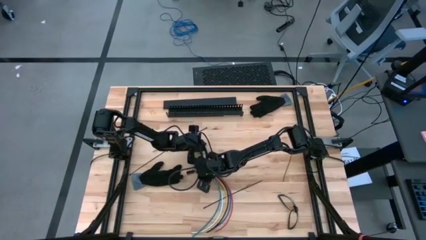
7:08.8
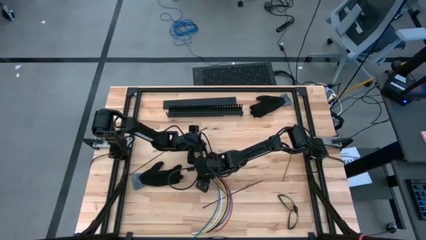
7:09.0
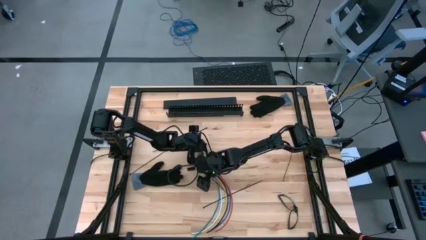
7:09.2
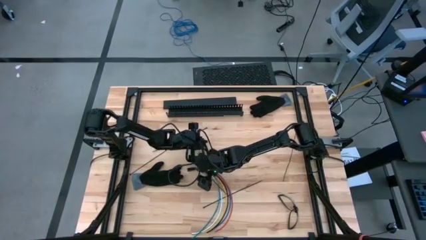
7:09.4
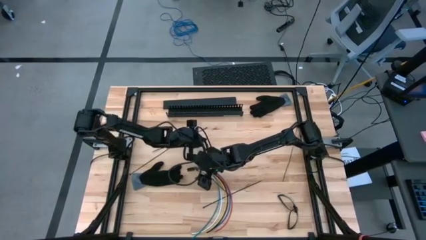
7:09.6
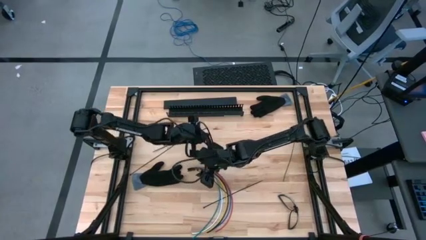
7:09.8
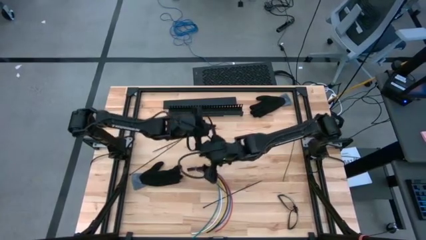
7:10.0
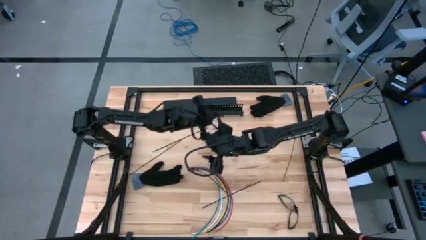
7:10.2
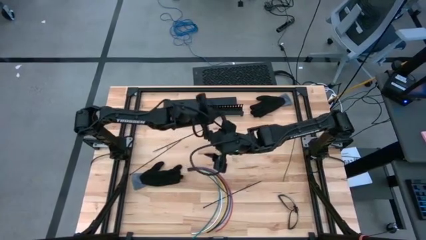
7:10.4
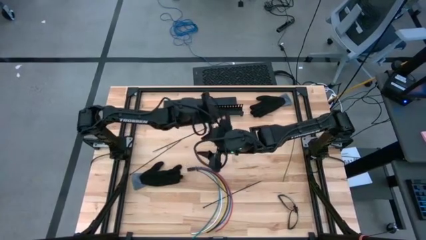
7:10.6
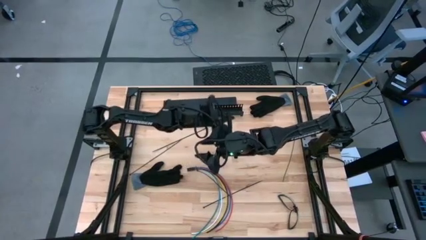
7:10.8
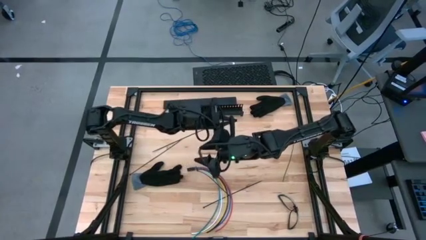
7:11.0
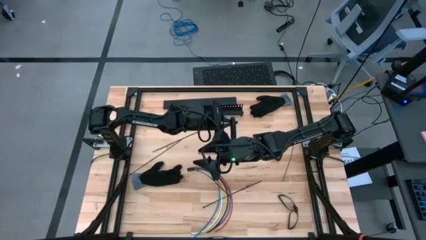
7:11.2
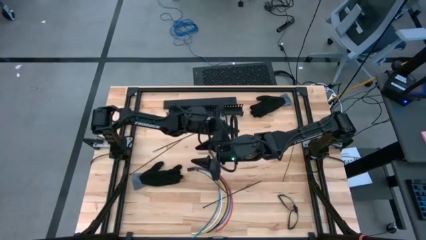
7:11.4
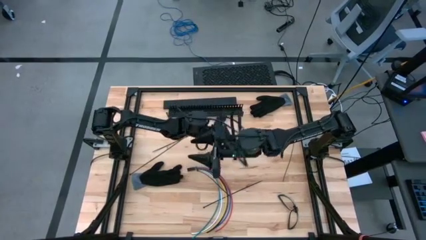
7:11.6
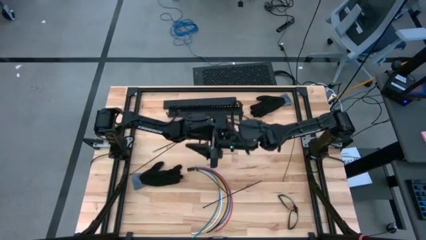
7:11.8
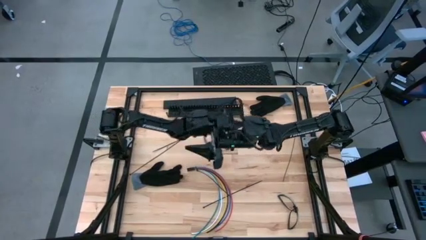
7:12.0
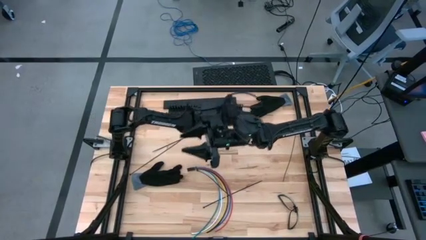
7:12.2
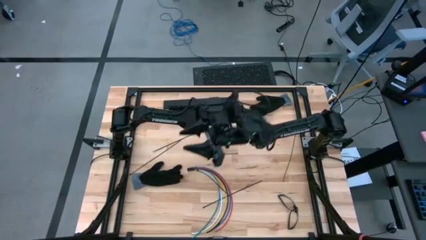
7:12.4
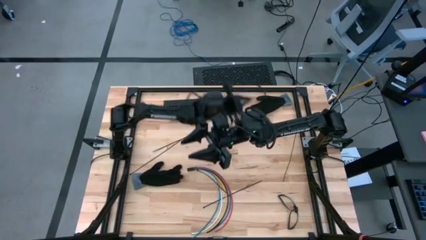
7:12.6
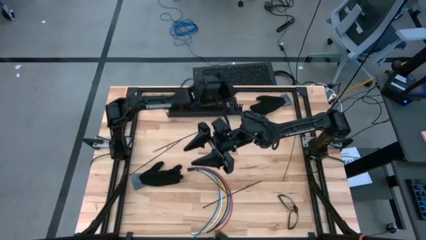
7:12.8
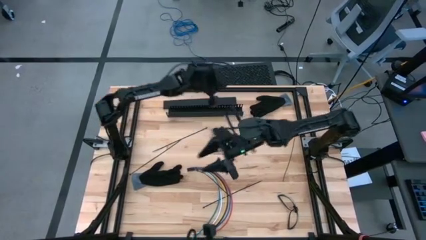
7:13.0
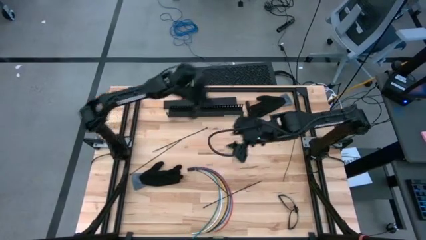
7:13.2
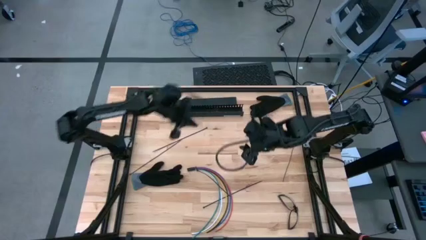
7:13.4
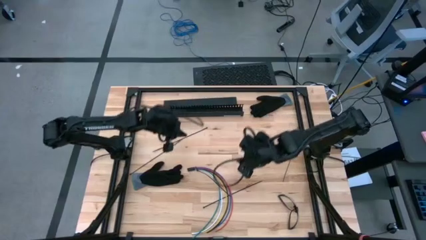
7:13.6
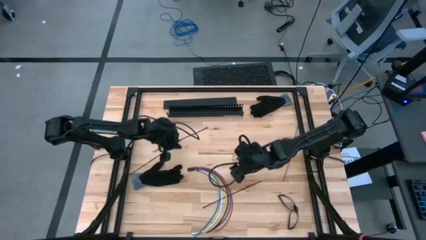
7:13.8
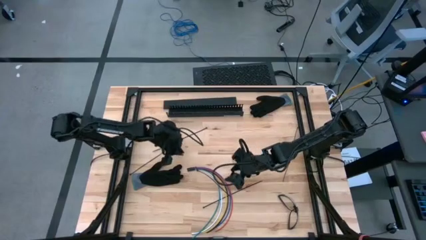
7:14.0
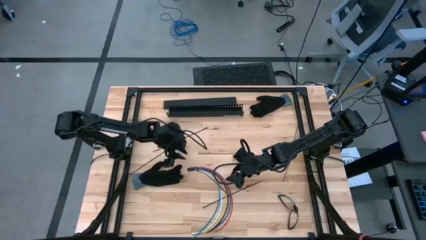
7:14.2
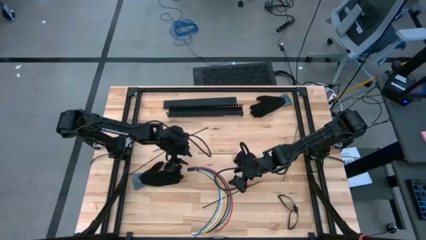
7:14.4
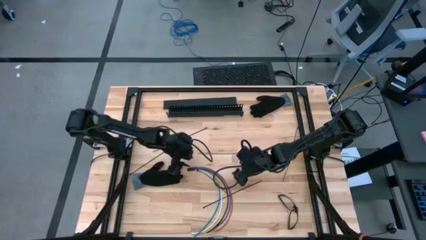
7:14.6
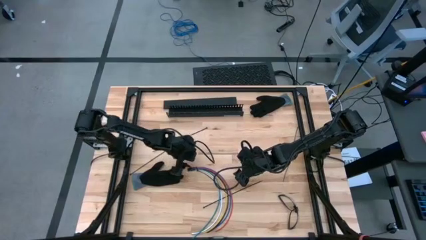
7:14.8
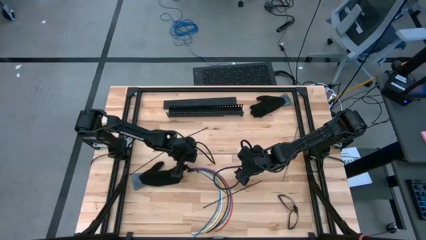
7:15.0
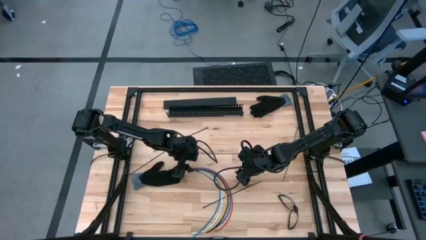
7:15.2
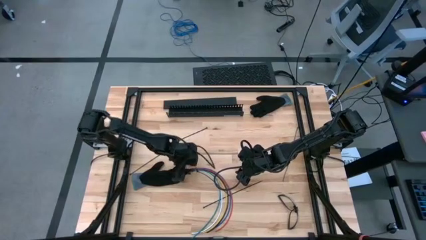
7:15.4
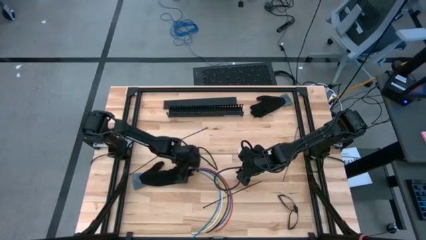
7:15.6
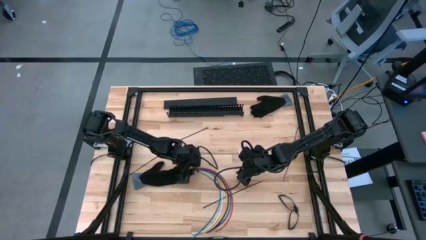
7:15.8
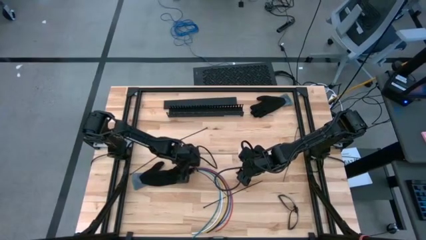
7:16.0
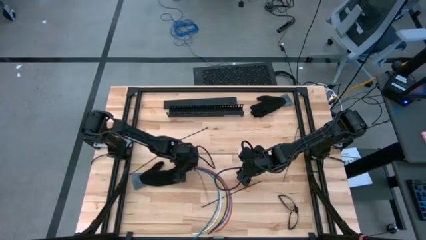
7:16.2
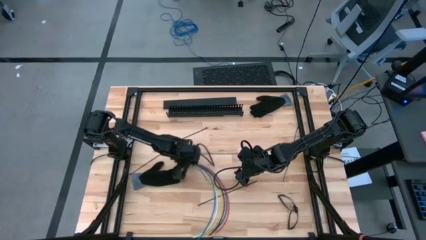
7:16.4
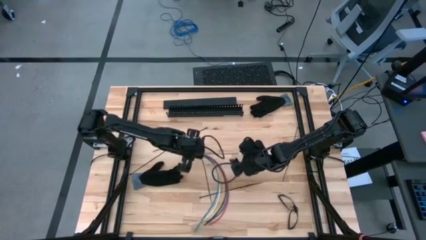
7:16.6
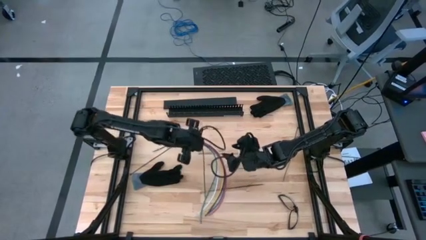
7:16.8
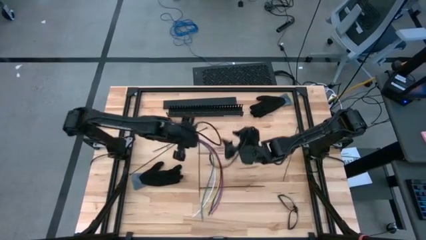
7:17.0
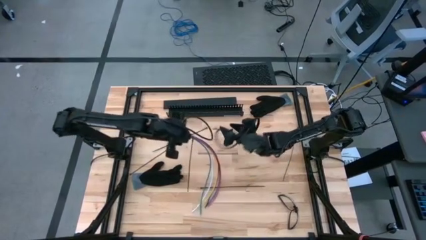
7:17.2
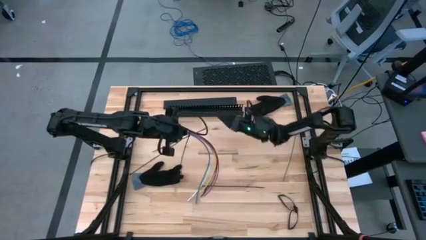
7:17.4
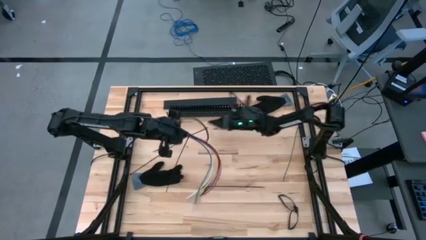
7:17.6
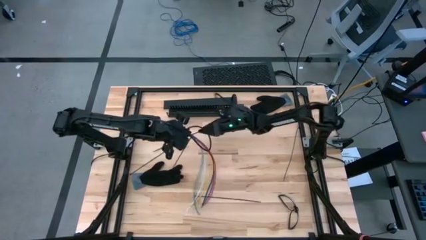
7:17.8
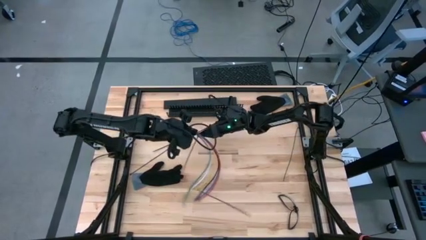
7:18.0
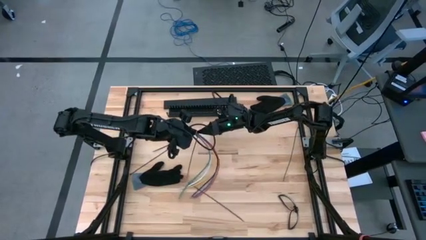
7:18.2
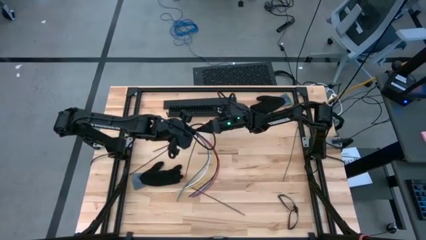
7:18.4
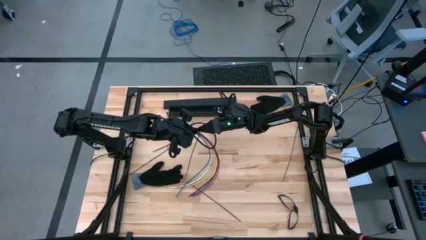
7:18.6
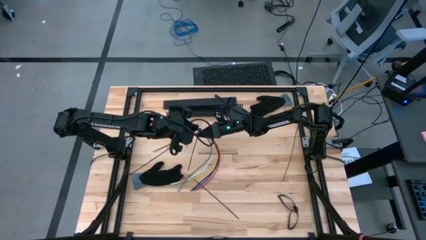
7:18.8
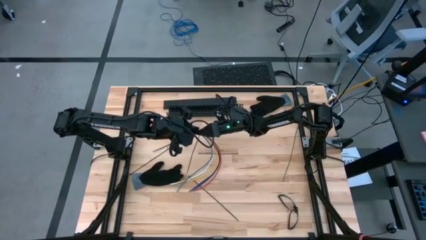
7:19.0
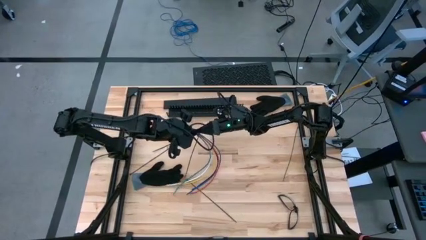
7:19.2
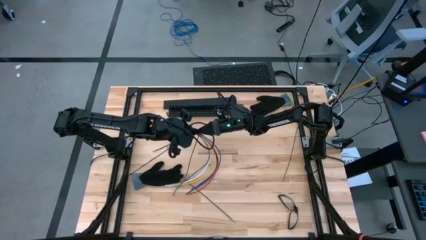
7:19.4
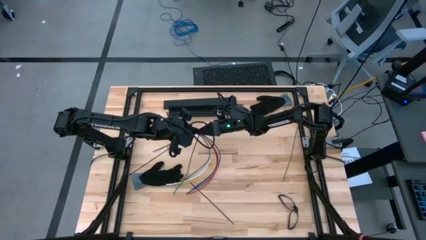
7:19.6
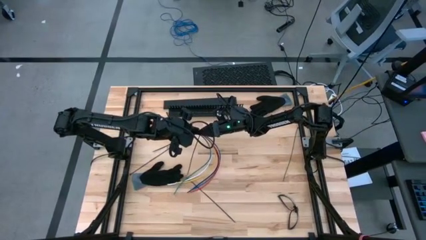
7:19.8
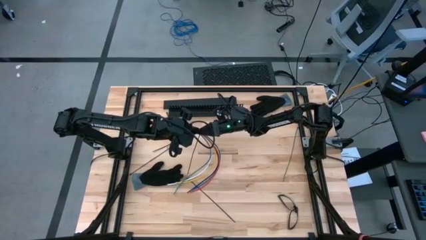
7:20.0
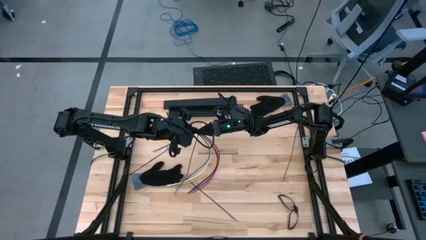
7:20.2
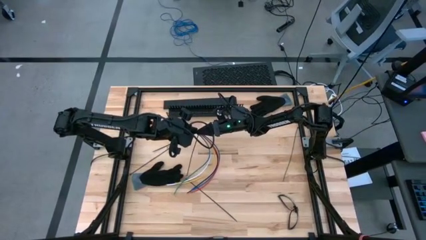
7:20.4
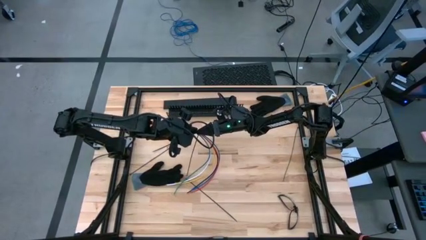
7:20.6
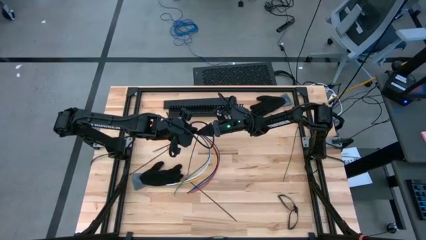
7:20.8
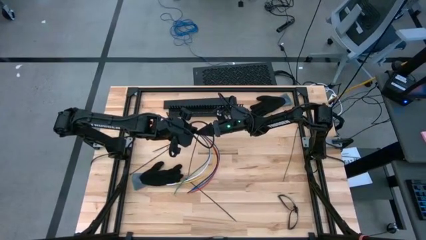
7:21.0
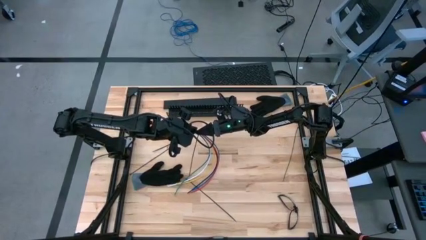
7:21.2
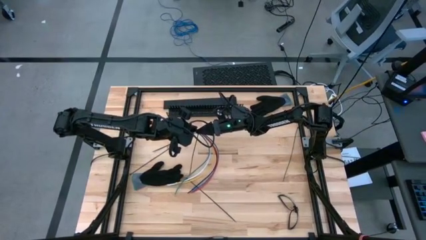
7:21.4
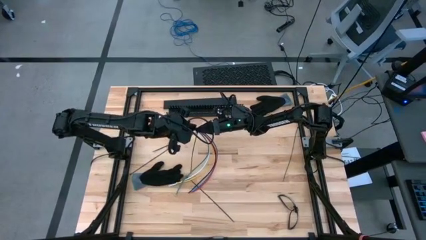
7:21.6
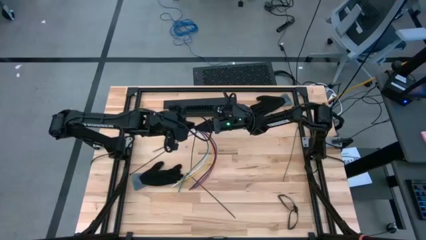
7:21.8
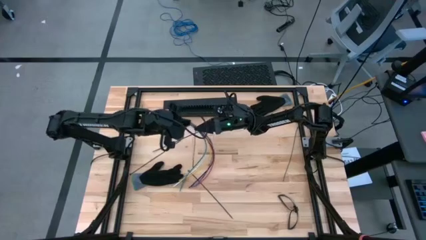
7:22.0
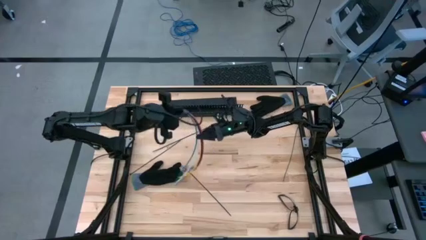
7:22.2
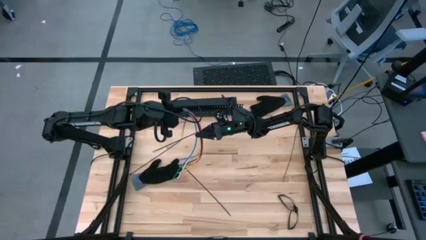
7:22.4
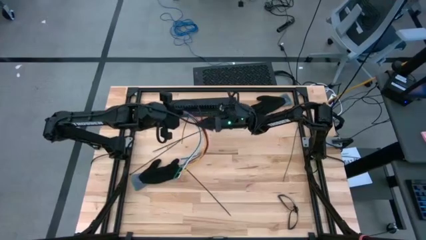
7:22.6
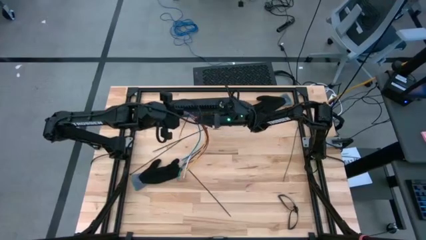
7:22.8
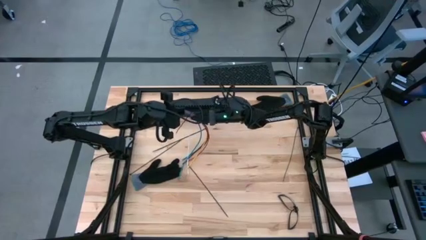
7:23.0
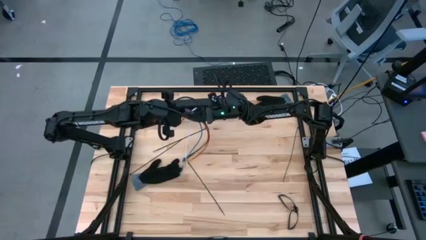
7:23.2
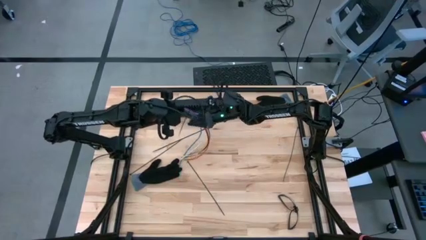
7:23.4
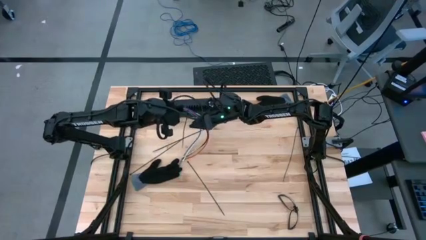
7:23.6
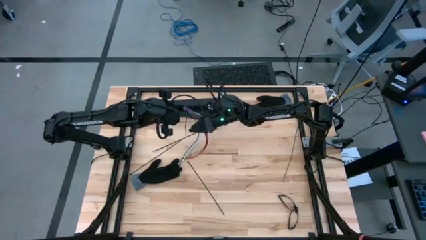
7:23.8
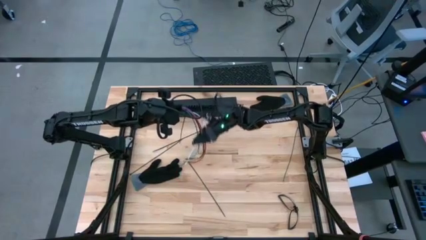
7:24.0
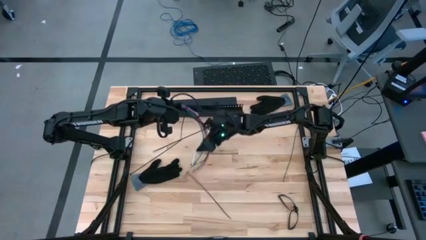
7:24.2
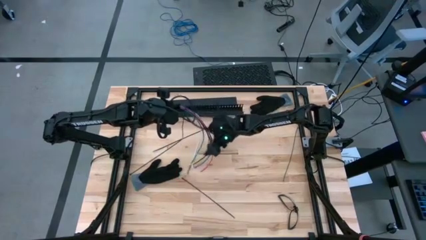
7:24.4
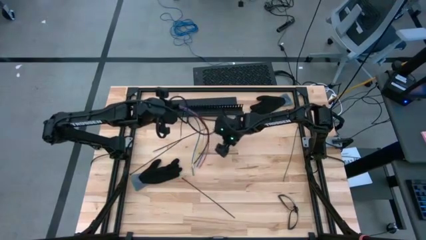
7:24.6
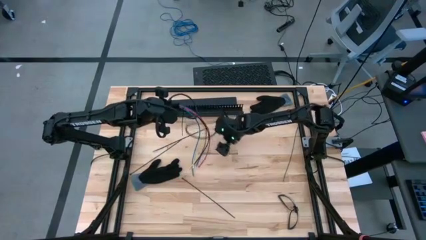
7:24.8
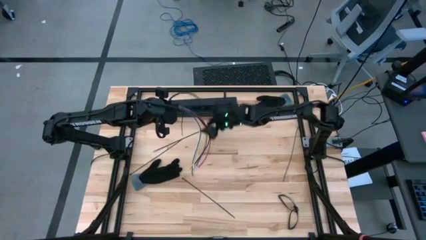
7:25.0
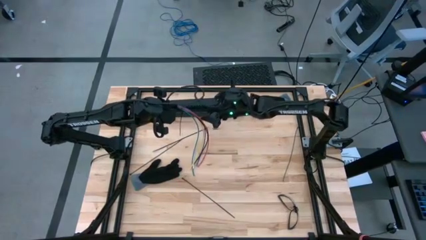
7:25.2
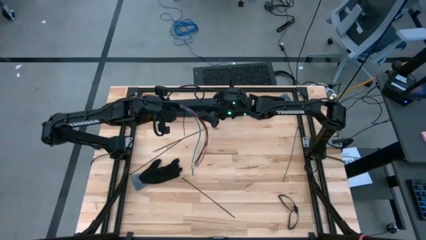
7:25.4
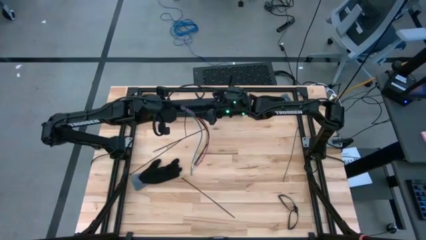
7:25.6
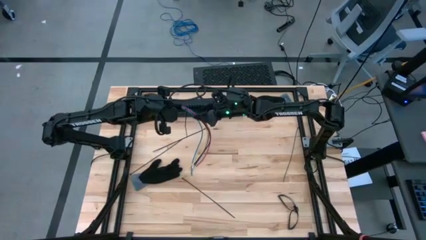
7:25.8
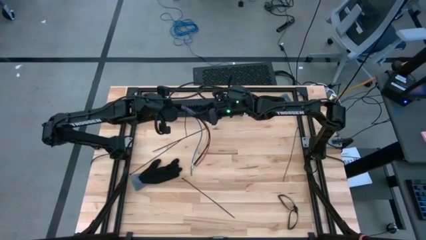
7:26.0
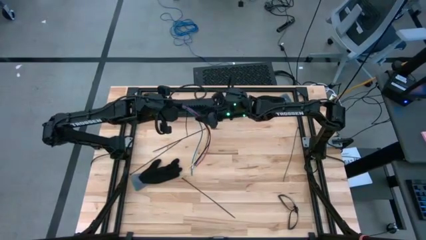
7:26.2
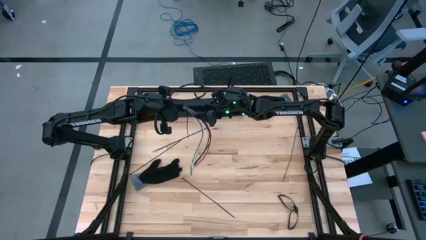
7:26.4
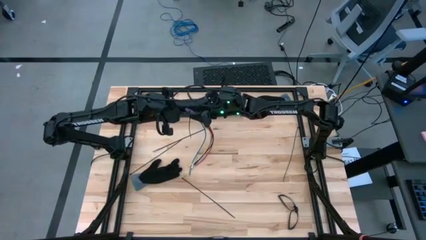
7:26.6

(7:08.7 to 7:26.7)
Task: Ziptie cables
Put the zip tied cabled wires into the cable duct
